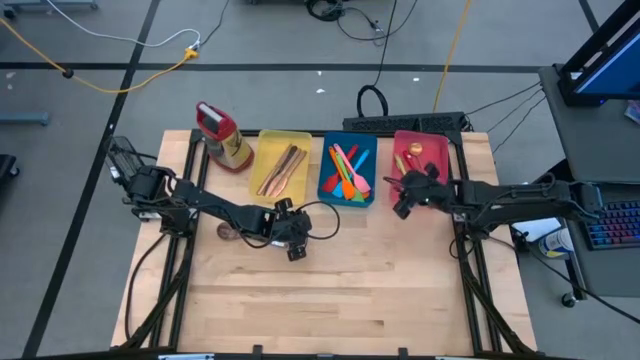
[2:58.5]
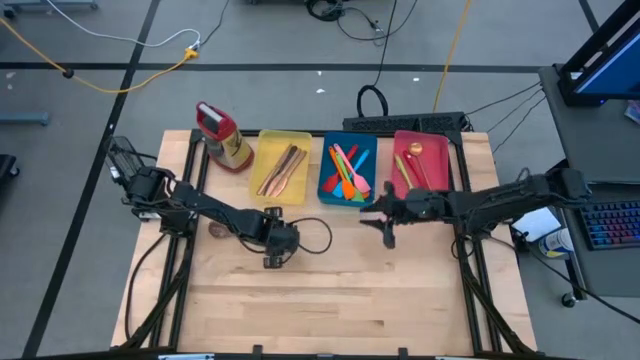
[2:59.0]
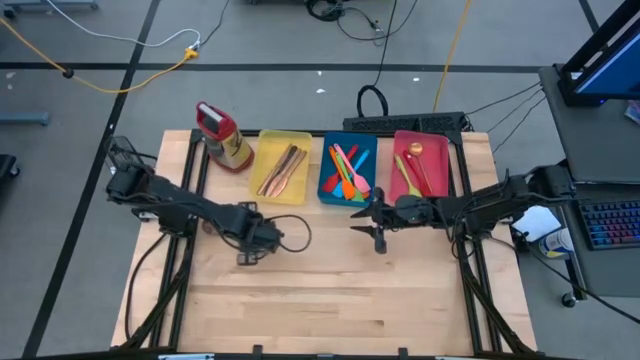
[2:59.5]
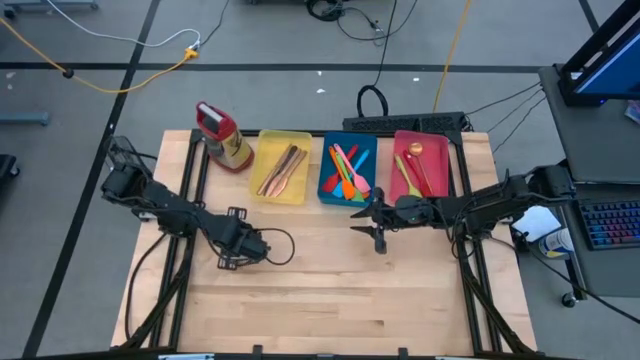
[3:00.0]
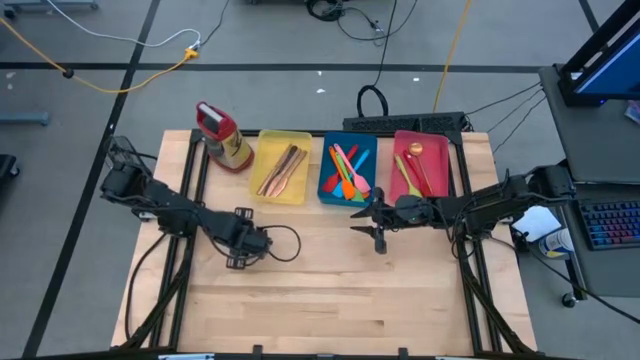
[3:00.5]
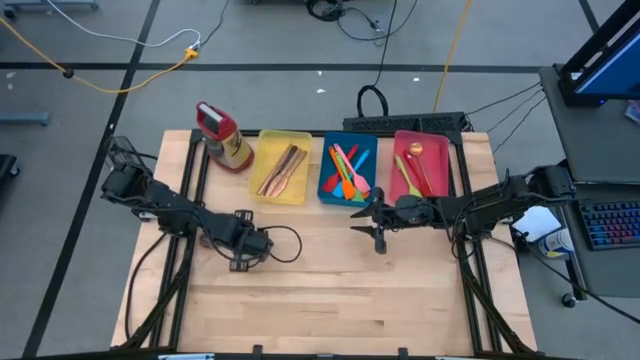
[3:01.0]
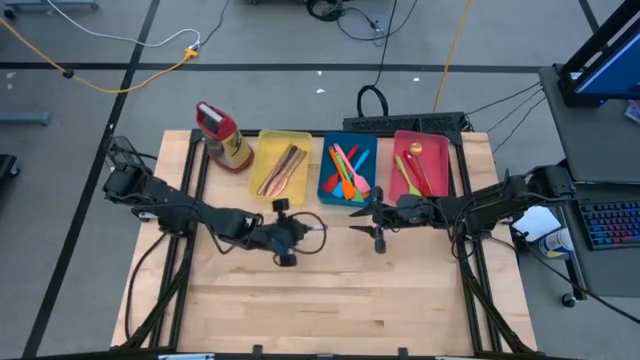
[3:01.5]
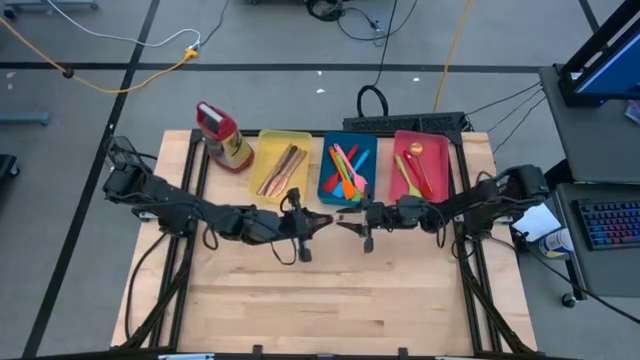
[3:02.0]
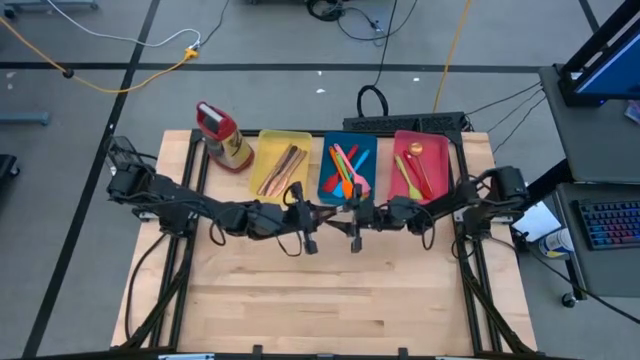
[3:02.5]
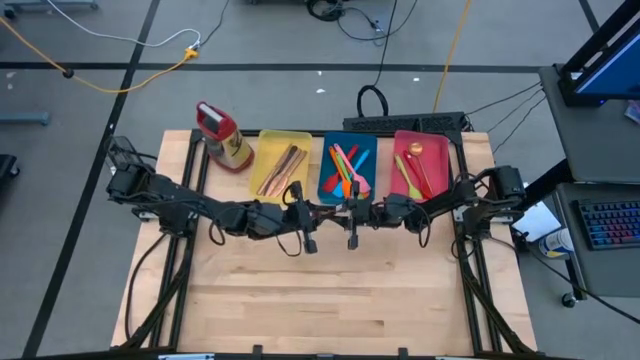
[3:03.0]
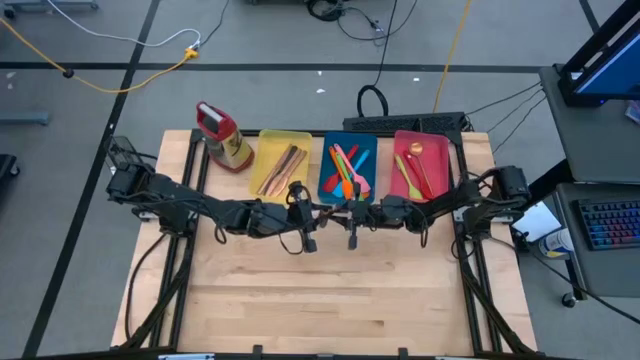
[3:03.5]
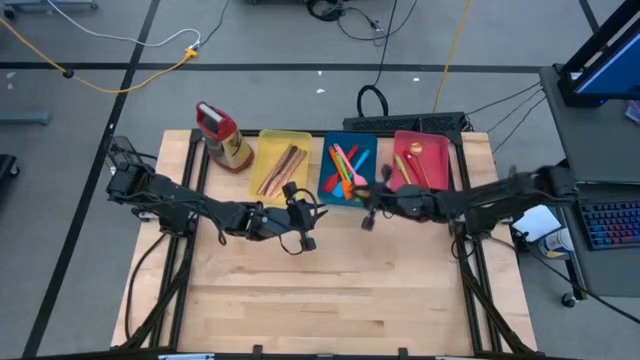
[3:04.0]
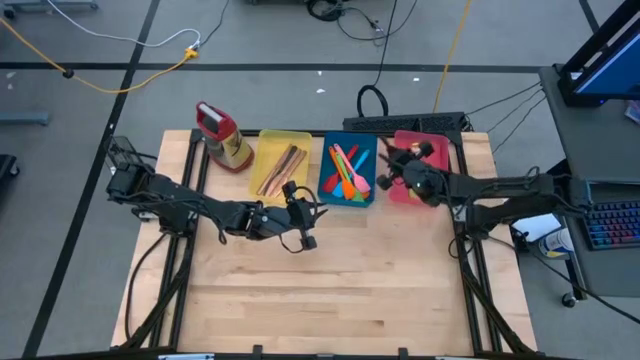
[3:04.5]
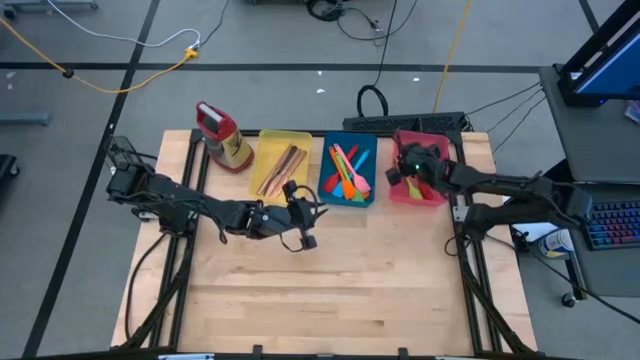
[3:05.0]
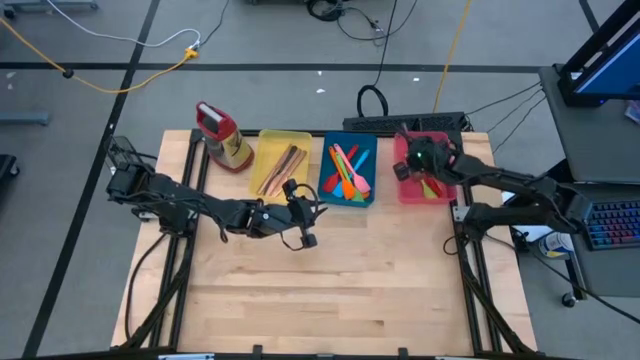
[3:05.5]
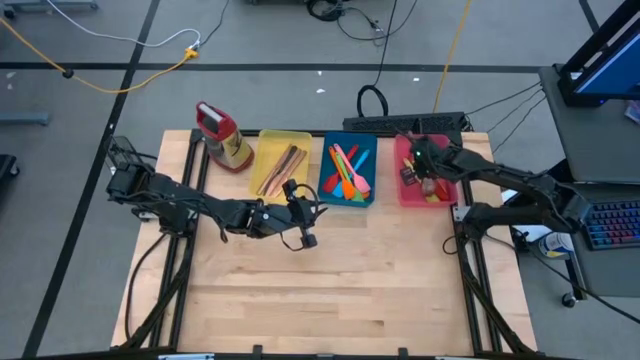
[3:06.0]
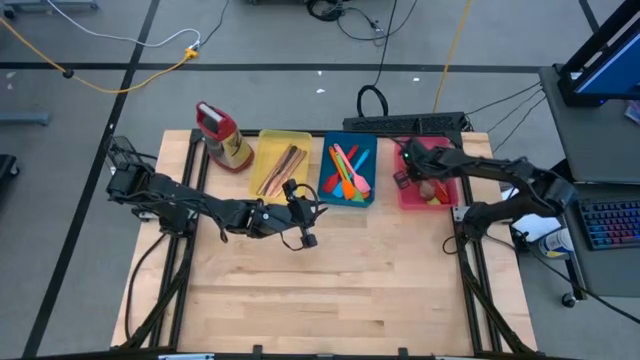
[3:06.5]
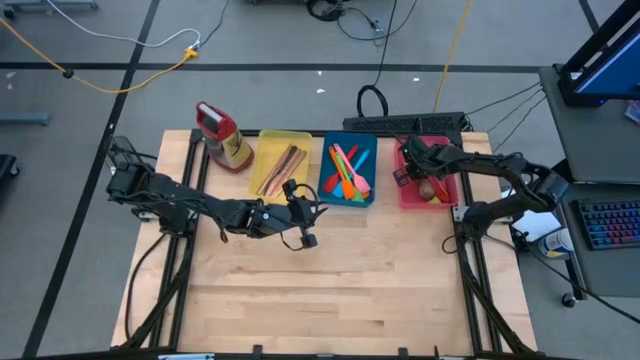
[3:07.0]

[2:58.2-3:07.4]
Task: Pick & Place Kitchen Items
Put the brown serving spoon into the pink bin

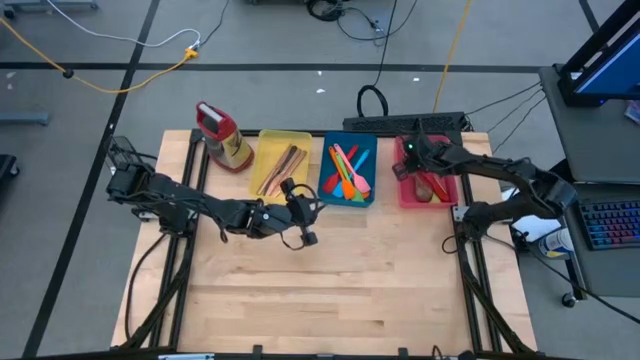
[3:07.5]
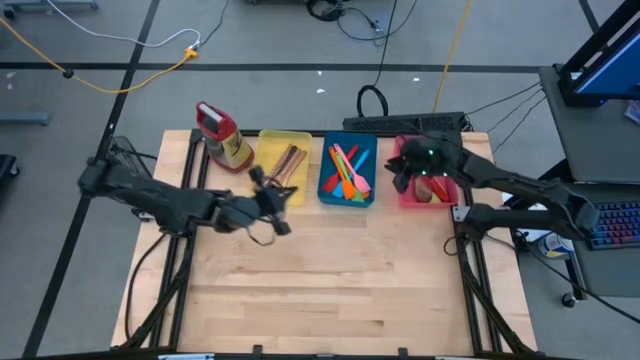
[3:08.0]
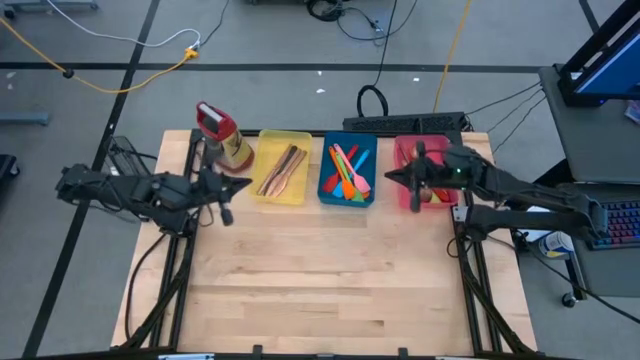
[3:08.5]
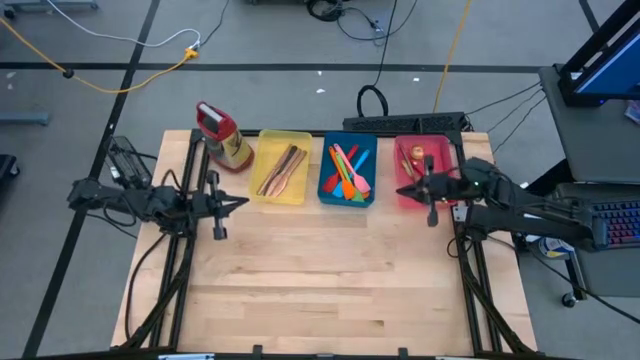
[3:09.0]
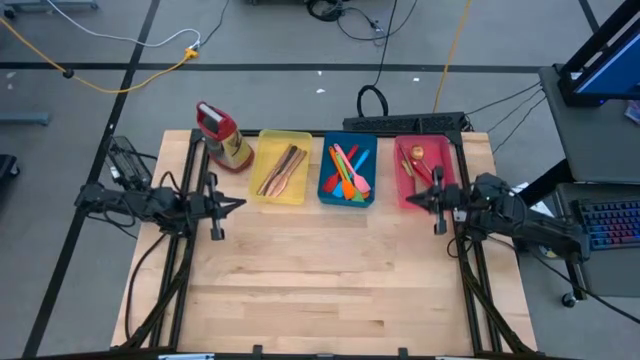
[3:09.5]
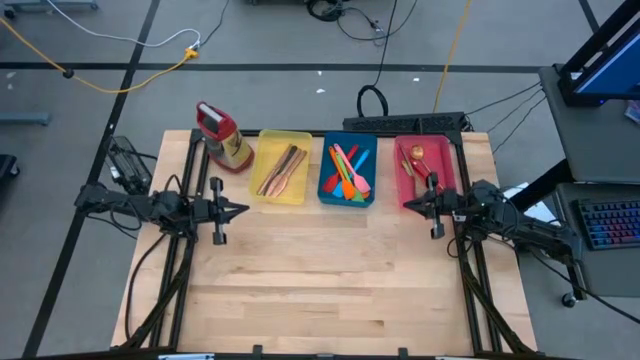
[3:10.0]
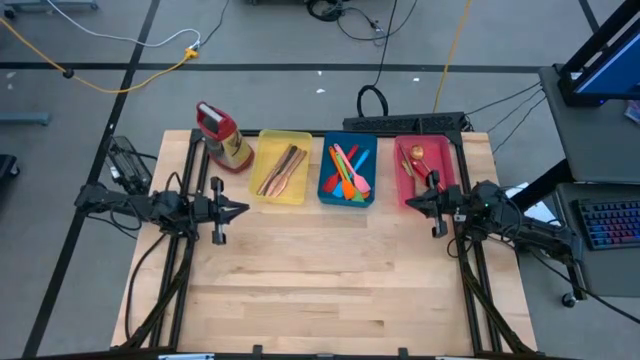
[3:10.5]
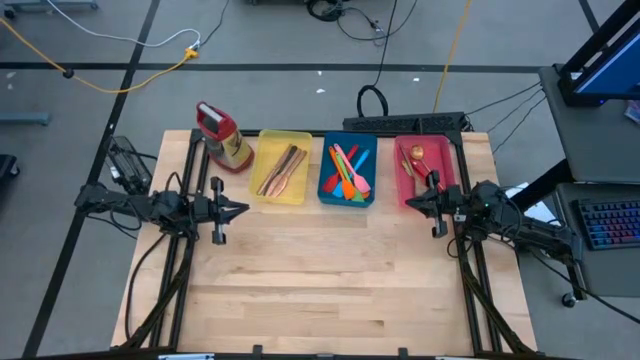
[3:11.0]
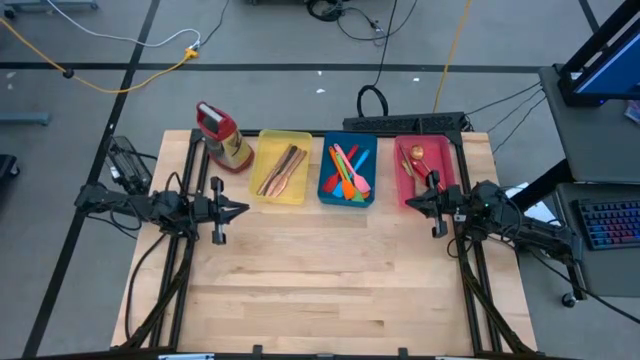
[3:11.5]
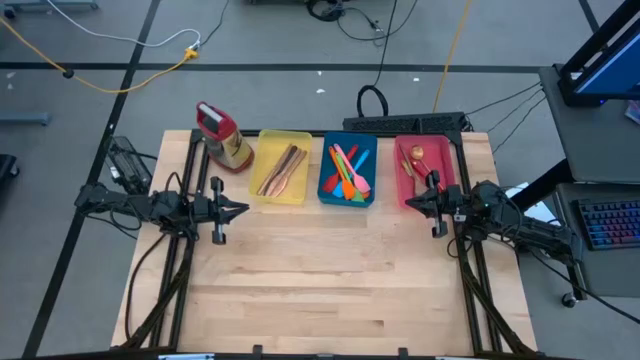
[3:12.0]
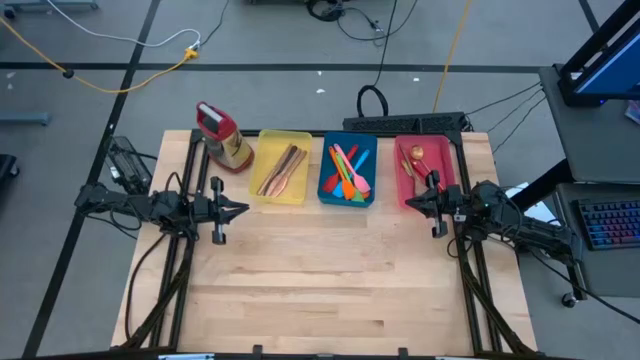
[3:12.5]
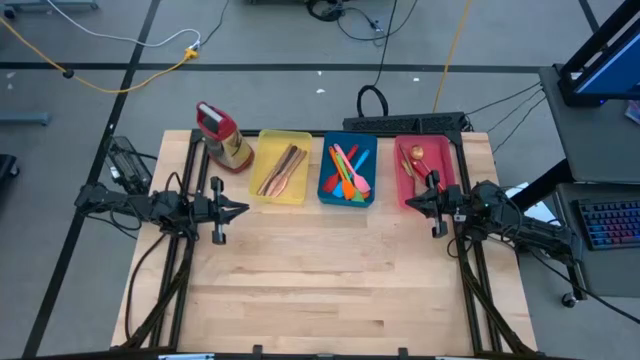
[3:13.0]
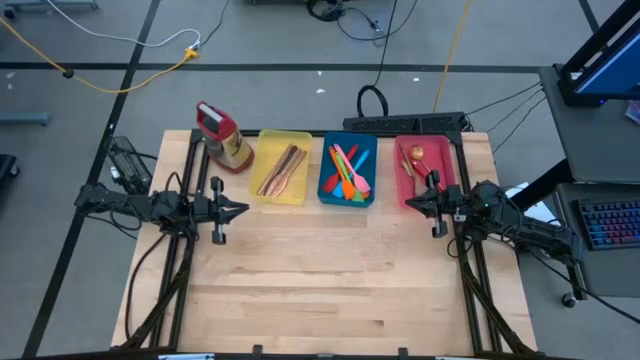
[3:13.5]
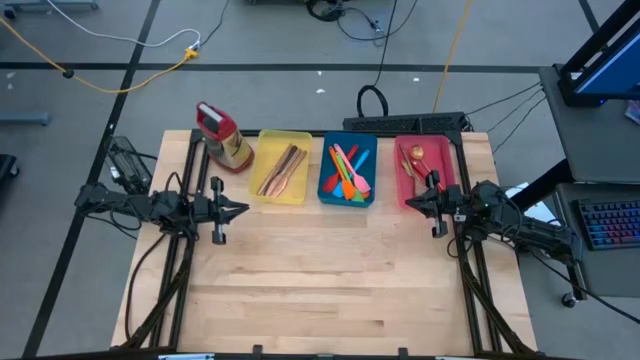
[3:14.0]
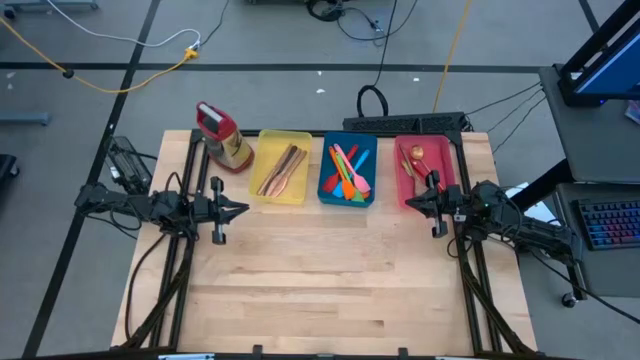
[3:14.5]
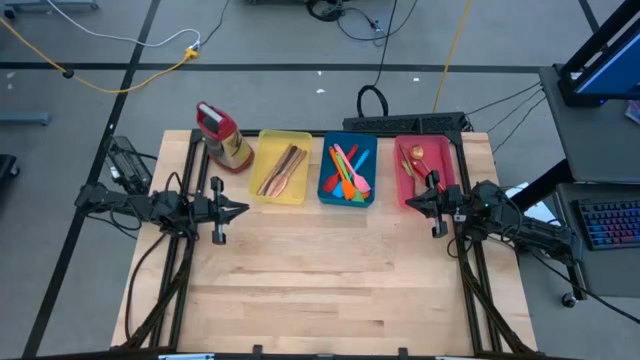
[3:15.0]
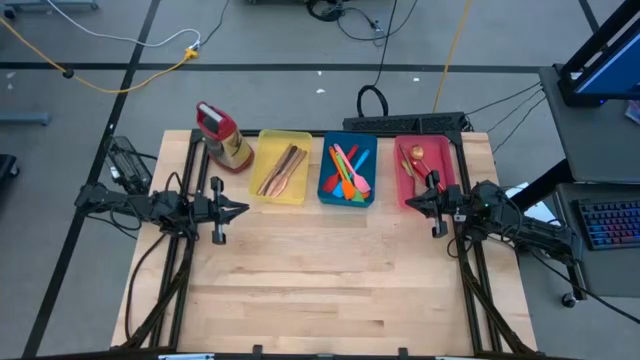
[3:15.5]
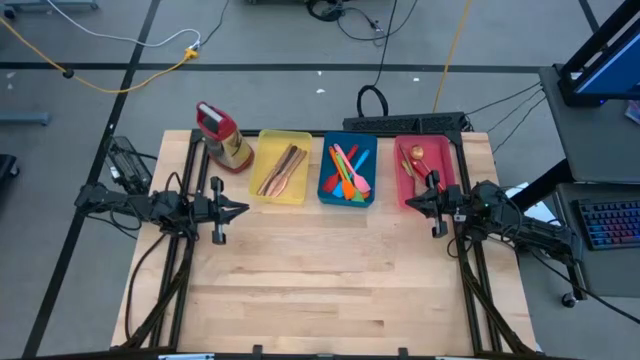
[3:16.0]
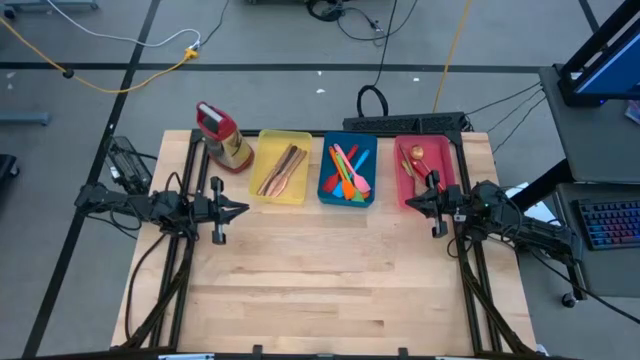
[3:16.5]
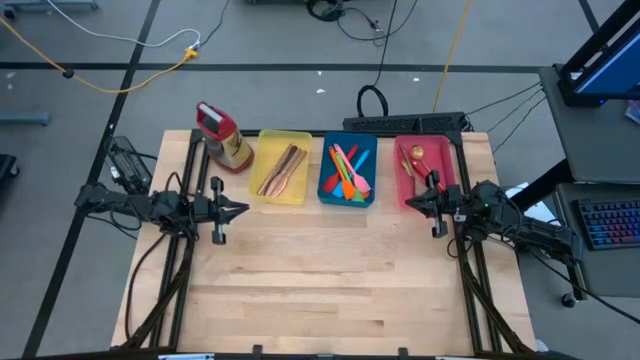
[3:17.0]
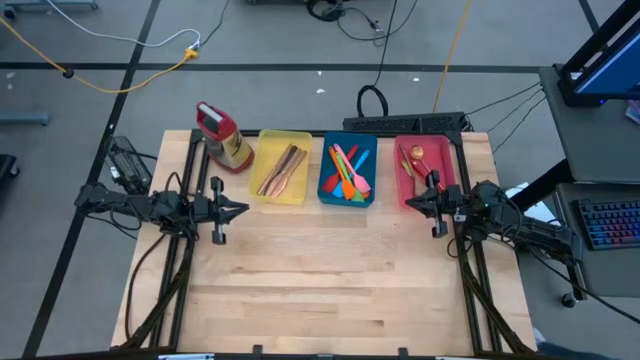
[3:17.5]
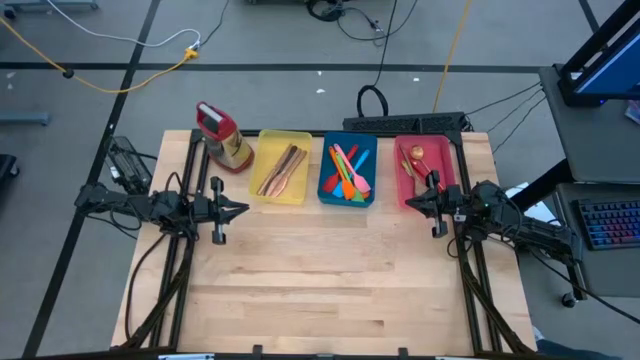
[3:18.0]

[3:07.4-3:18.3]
Return to Home Position

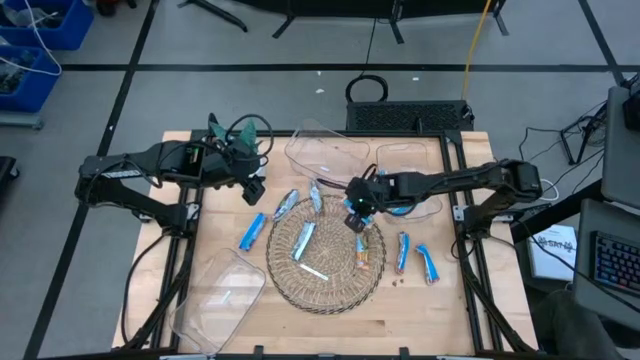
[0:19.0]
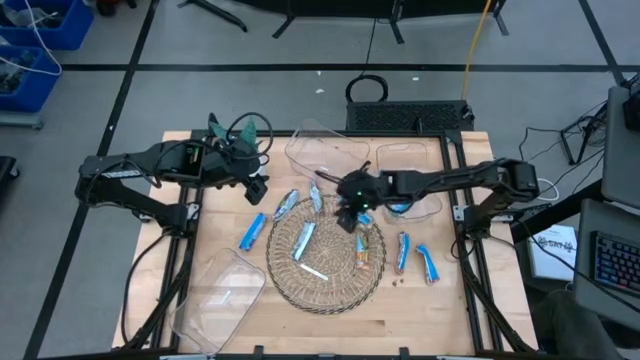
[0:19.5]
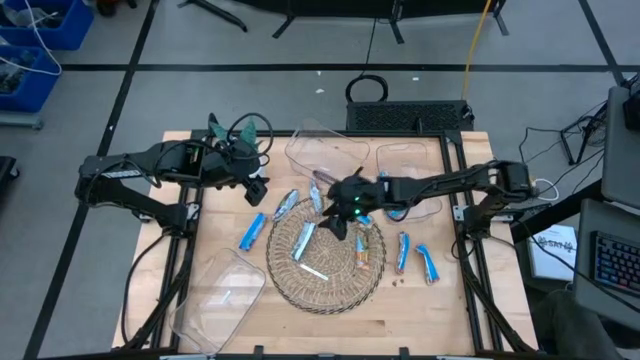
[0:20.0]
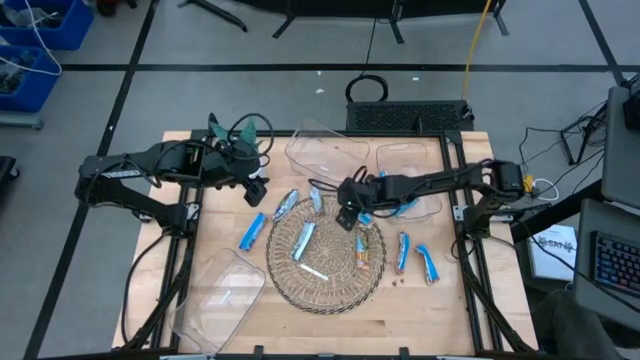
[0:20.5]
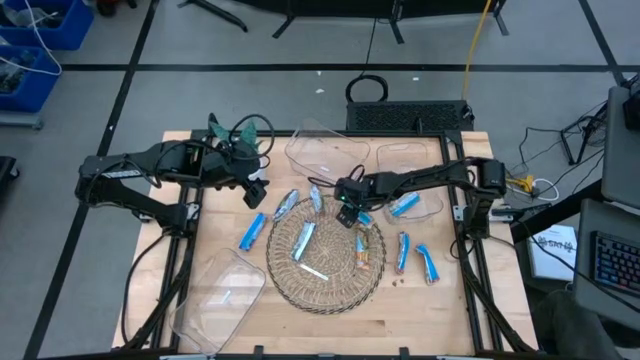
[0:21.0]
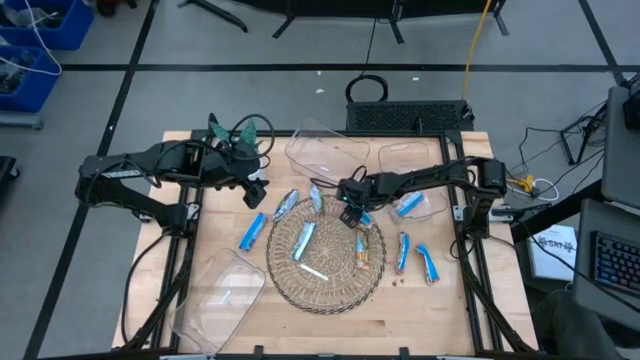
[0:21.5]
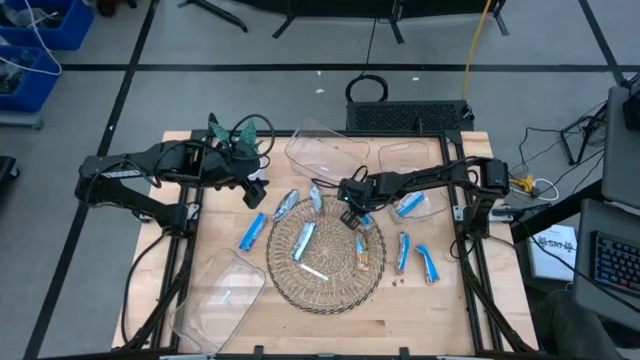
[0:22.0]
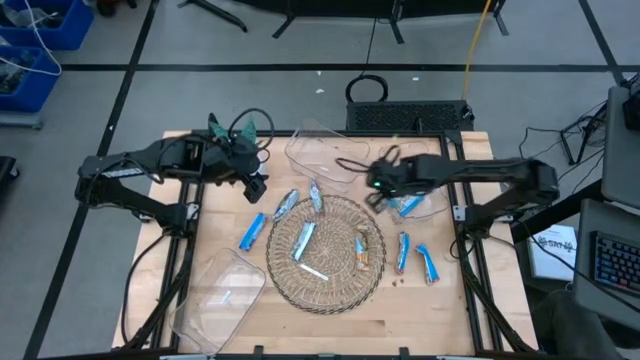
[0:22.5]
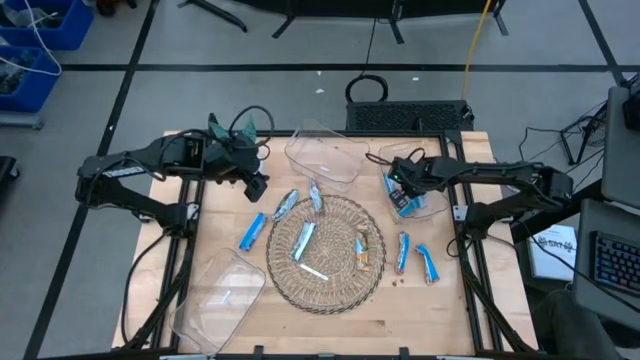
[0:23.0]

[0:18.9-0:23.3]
Task: Pick and place Granola Bars by type
Put the top yellow granola bar into the top right transparent bin
